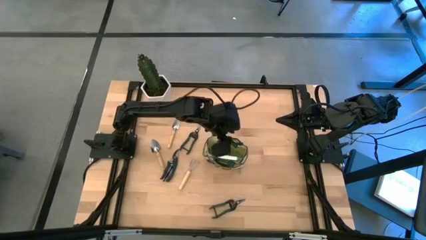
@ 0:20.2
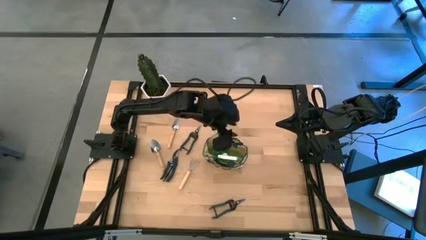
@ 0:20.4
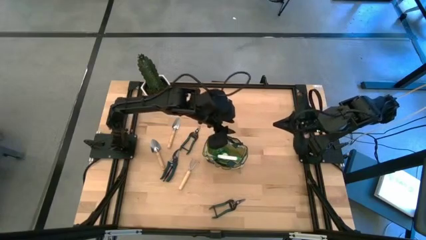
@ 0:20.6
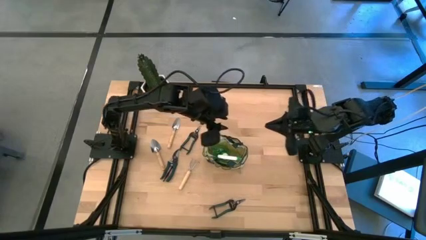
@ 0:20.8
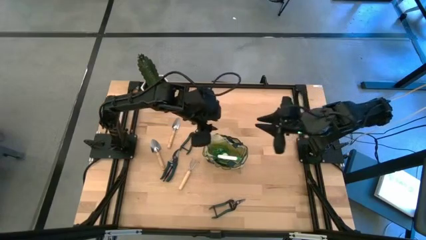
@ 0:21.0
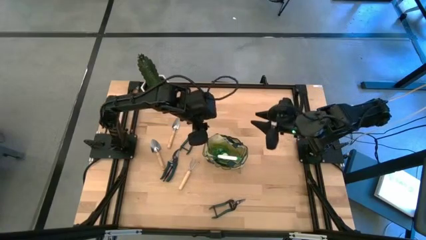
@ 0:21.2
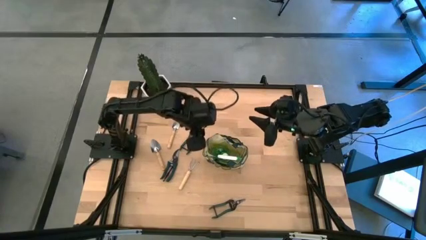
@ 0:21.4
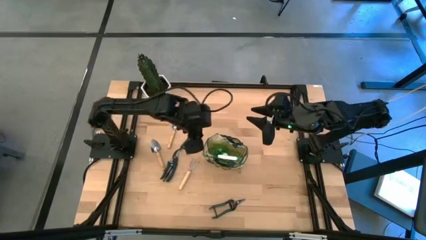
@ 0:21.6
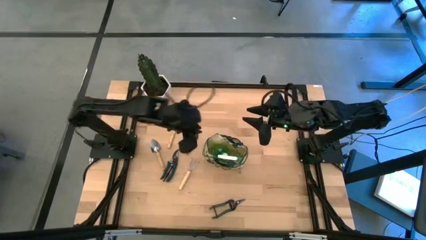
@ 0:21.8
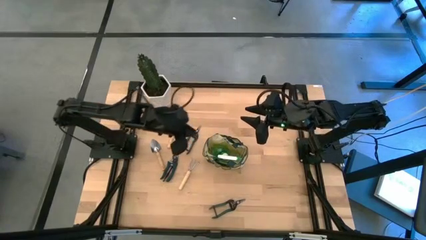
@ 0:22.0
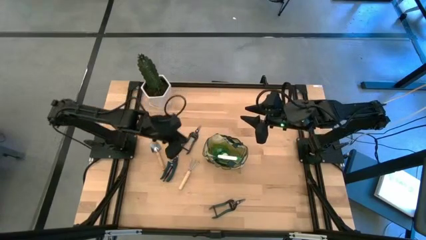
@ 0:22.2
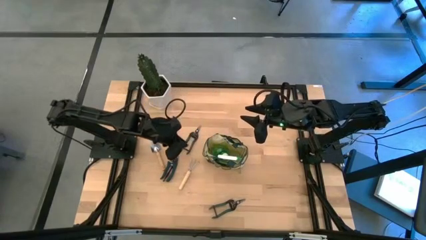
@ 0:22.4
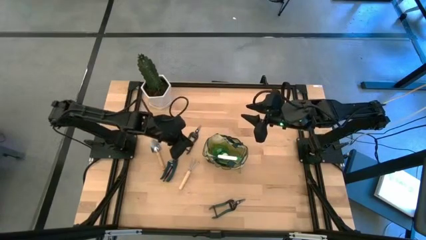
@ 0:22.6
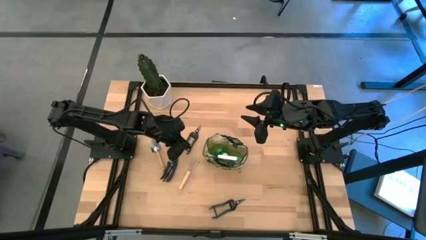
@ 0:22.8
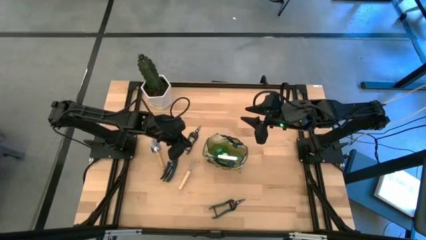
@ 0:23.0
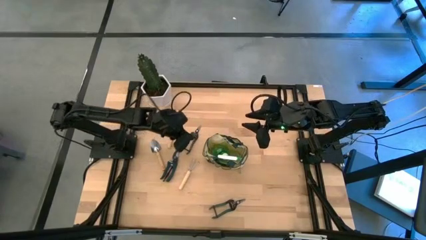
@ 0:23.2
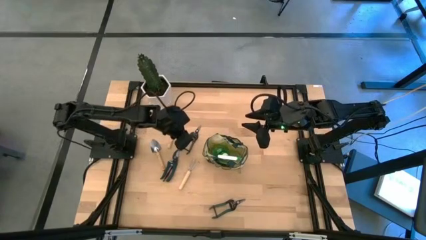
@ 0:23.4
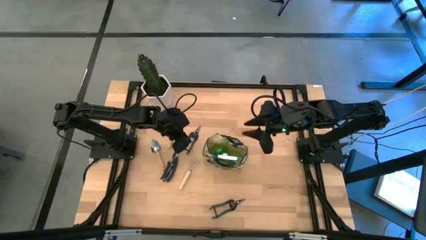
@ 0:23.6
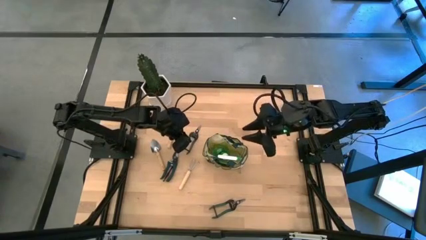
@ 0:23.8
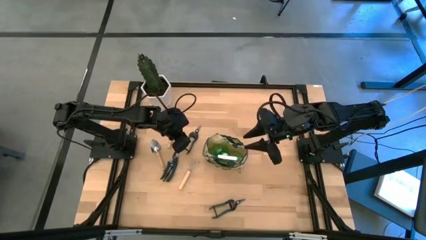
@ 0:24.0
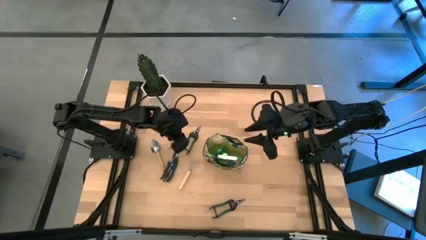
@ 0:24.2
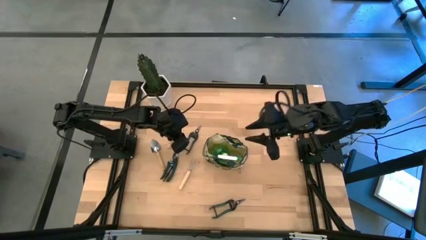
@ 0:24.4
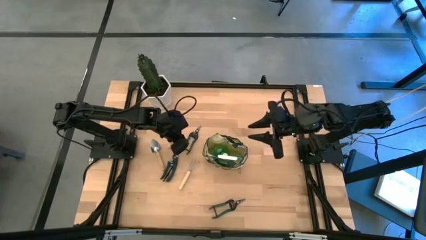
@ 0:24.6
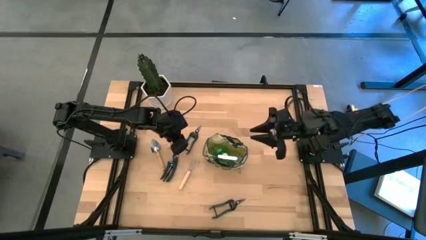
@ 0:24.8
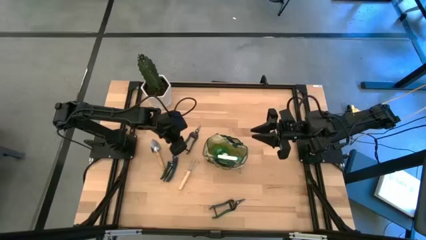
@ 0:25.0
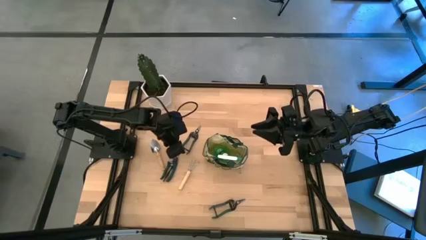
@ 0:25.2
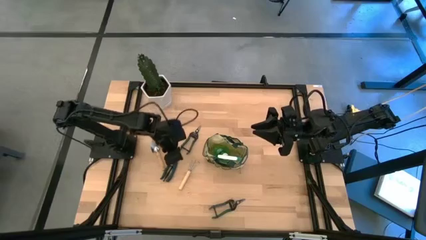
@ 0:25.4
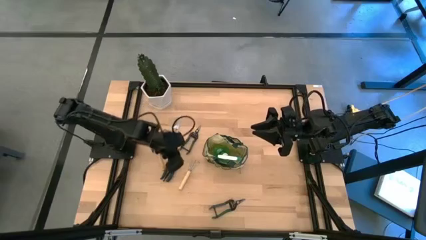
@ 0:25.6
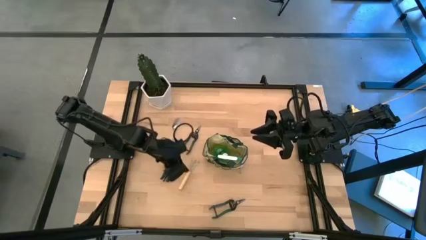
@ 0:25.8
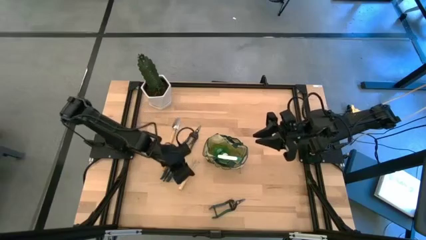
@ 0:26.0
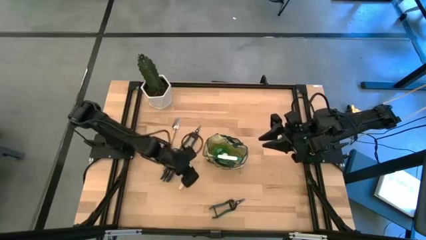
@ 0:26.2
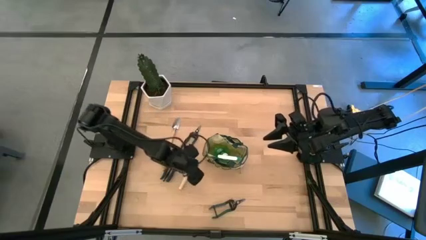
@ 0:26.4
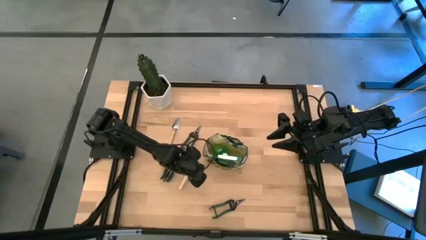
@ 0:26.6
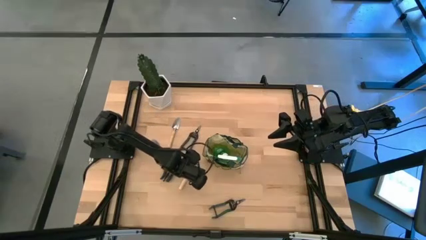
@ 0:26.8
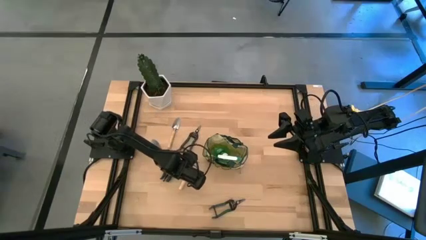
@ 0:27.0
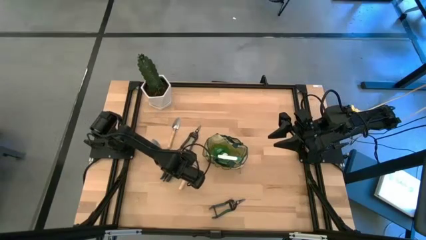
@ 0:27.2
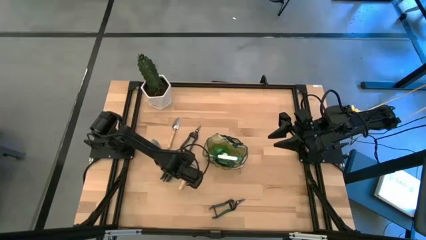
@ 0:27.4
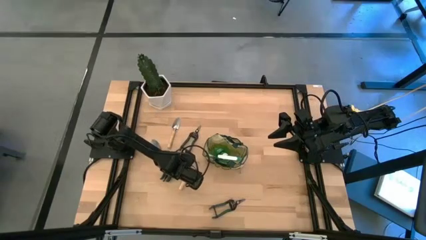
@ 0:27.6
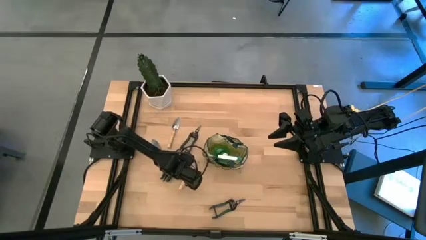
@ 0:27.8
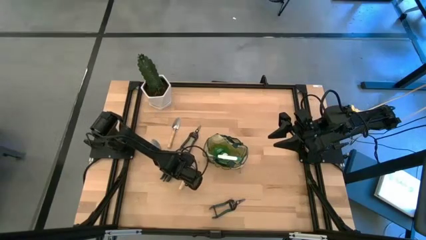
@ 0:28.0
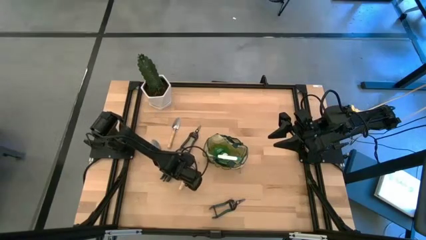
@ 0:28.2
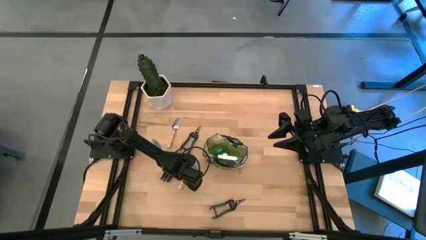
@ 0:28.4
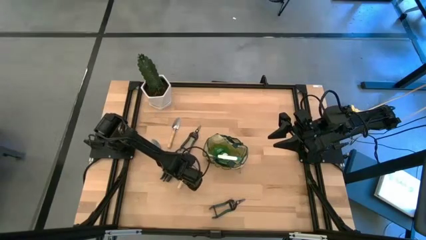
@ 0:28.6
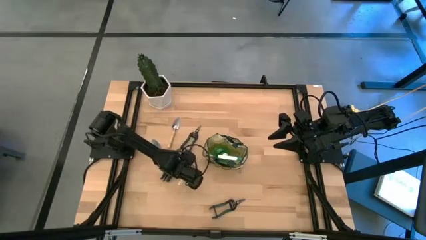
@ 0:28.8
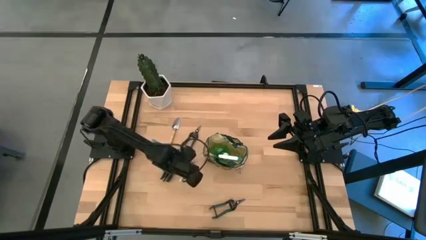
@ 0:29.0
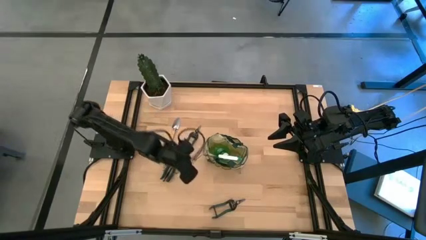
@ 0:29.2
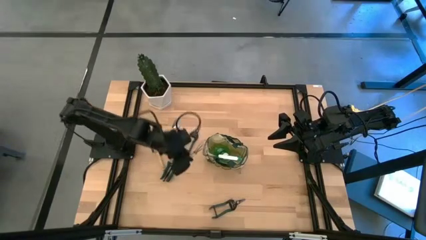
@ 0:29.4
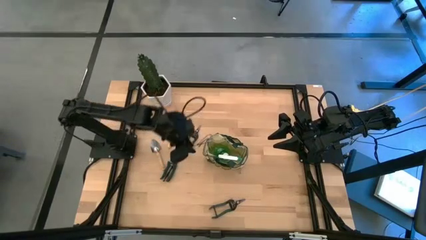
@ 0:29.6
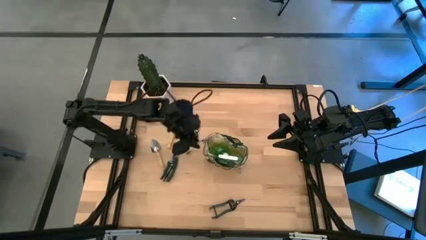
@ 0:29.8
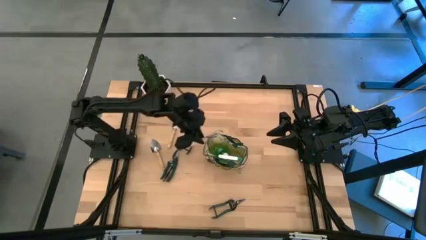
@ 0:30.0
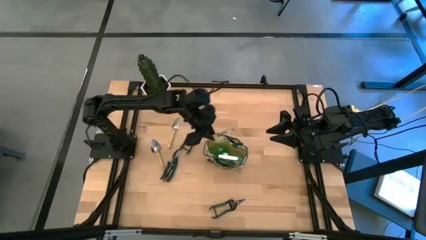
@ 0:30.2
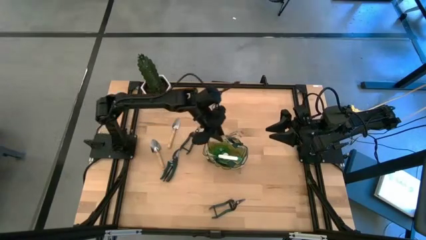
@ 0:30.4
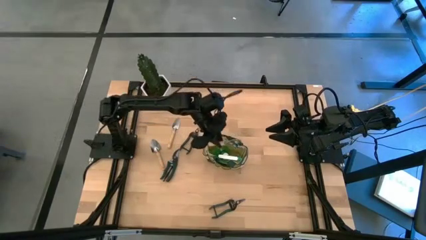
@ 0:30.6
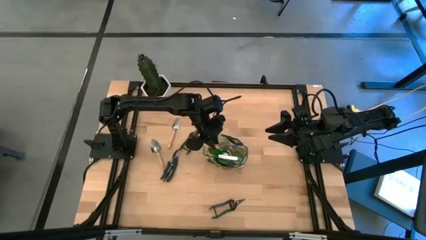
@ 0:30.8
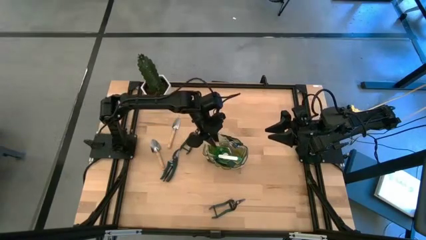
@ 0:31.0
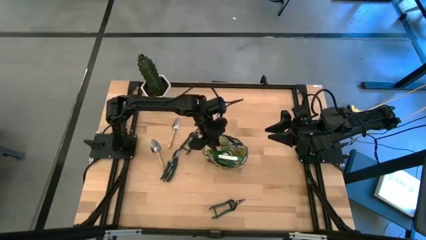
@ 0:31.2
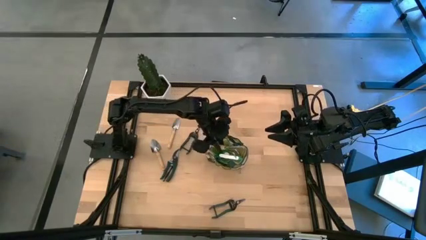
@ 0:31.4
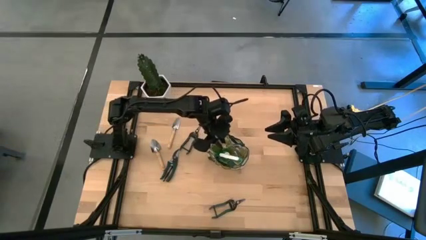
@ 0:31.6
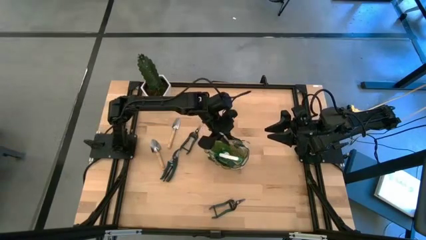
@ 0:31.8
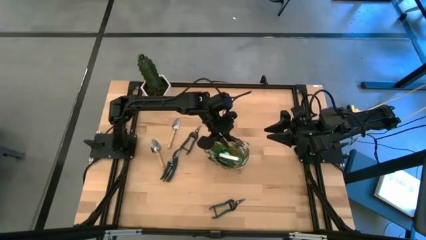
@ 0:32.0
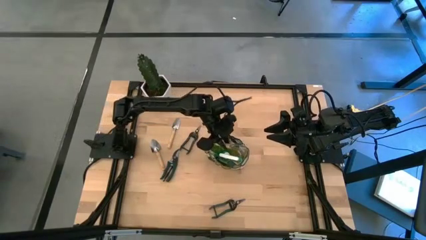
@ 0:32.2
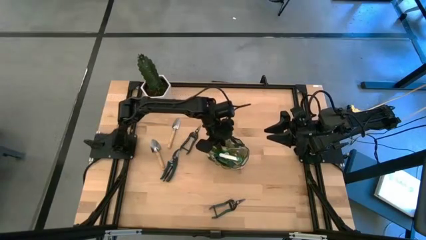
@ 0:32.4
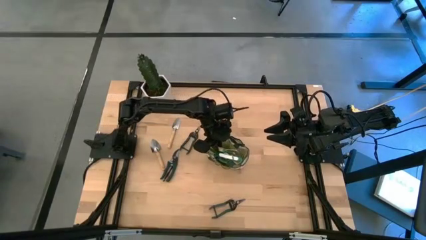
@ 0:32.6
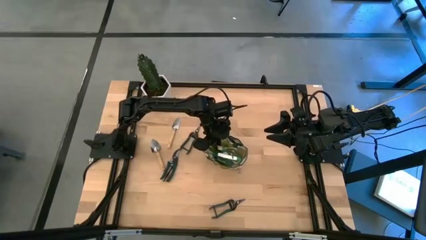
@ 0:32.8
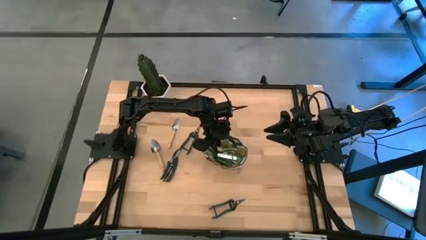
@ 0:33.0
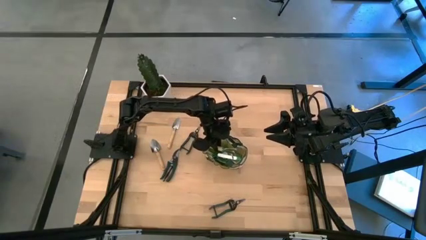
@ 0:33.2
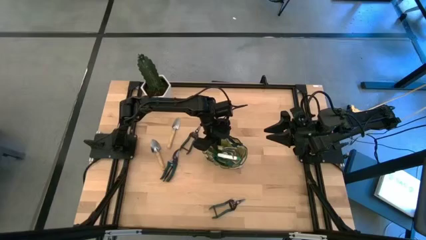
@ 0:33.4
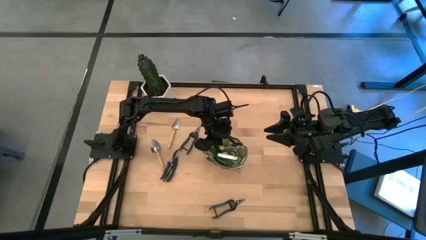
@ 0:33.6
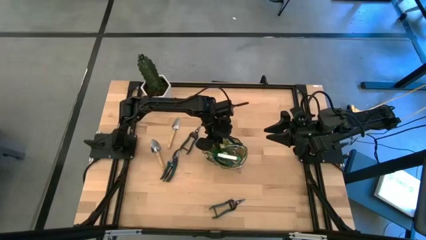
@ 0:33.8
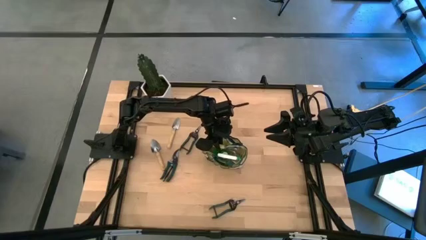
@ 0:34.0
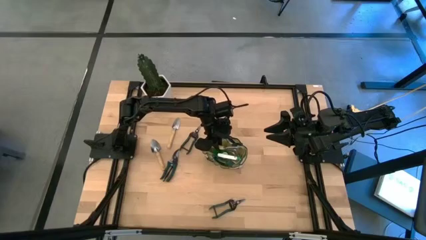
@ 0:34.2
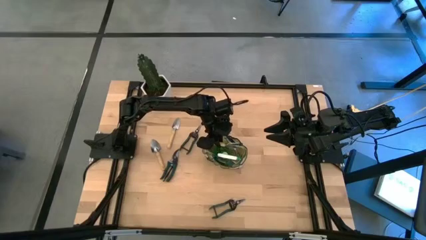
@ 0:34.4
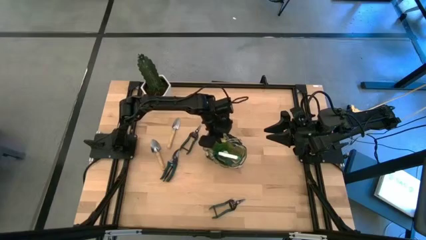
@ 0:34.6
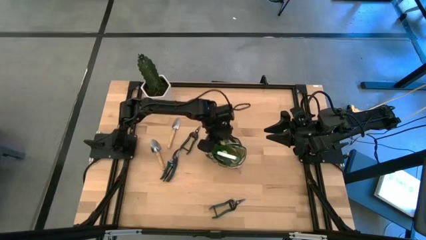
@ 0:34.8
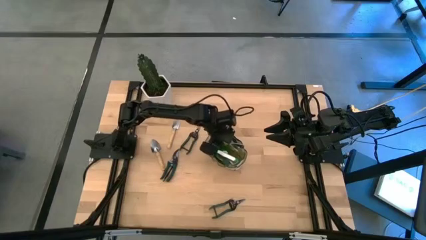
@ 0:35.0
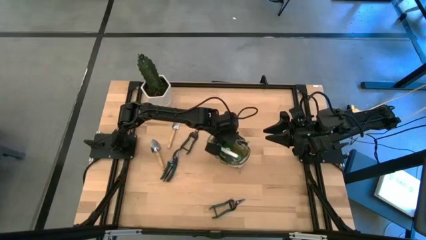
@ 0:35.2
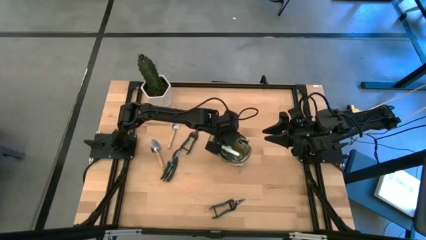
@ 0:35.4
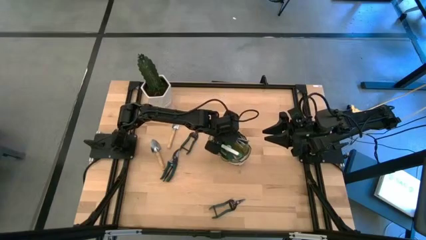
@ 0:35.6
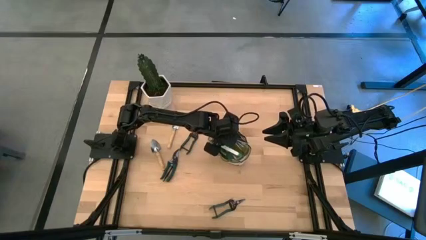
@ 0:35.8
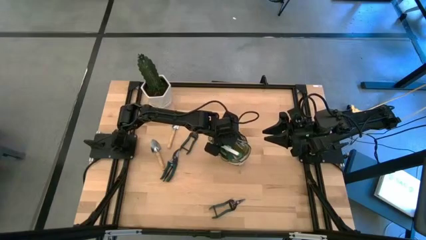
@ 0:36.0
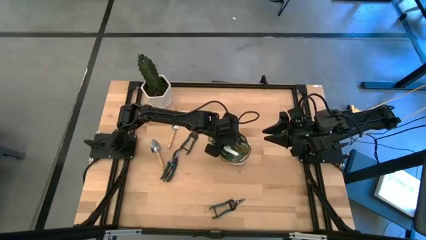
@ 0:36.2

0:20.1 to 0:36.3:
Task: Pick & Place Garden tools in Gardening bag
Put the hand rake into the gardening bag
